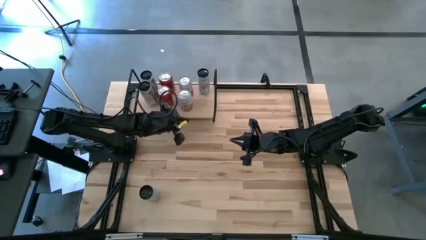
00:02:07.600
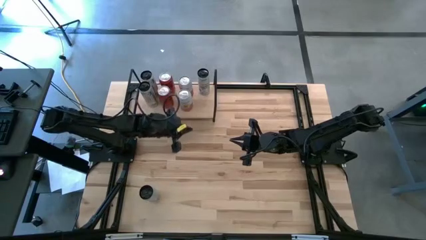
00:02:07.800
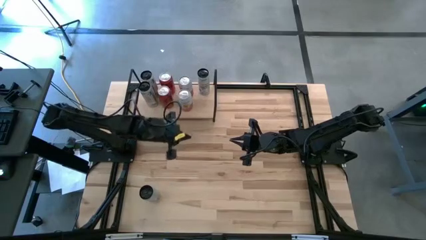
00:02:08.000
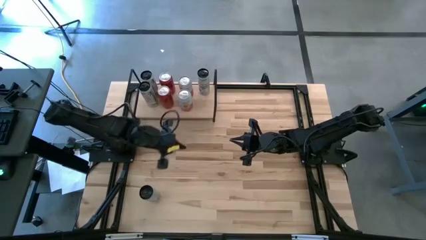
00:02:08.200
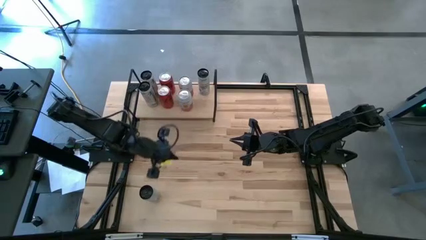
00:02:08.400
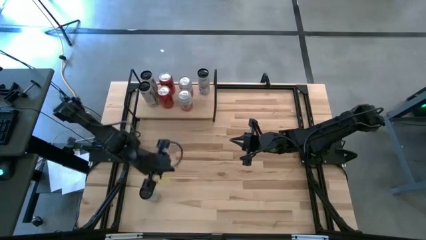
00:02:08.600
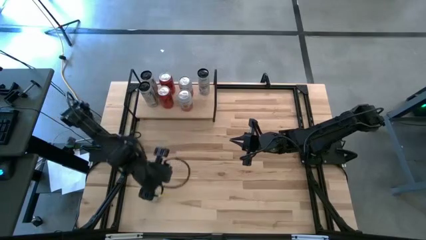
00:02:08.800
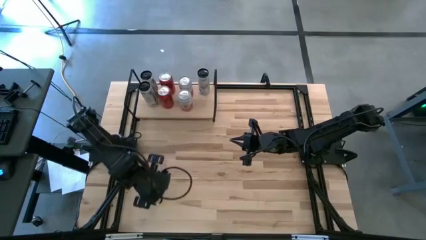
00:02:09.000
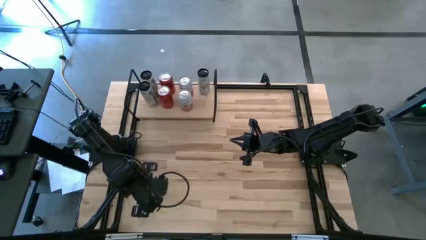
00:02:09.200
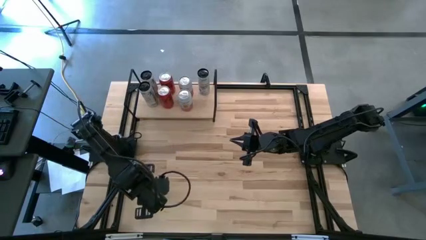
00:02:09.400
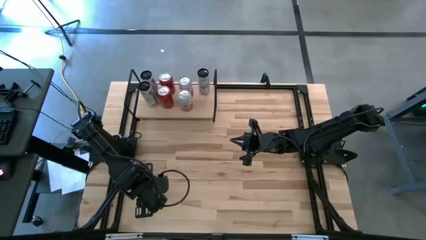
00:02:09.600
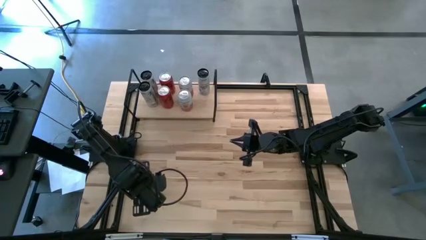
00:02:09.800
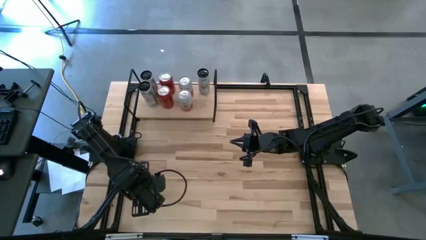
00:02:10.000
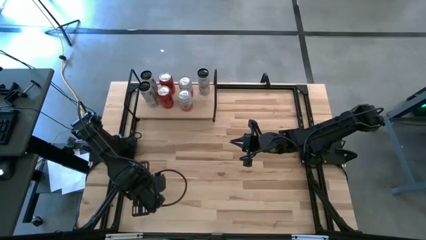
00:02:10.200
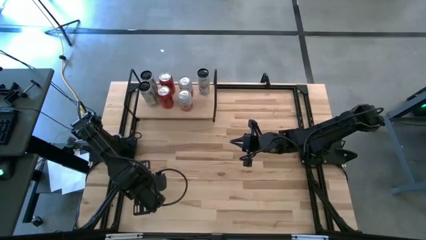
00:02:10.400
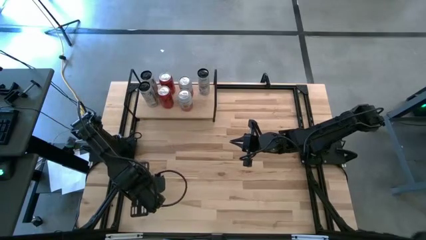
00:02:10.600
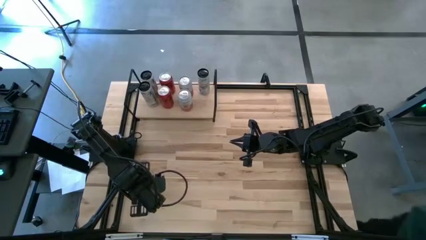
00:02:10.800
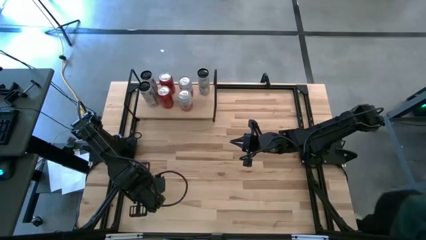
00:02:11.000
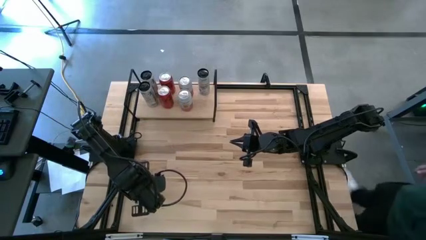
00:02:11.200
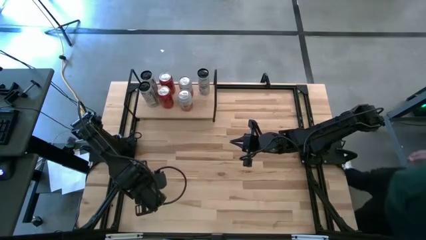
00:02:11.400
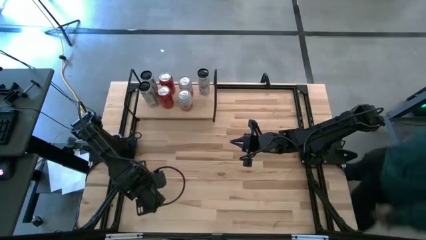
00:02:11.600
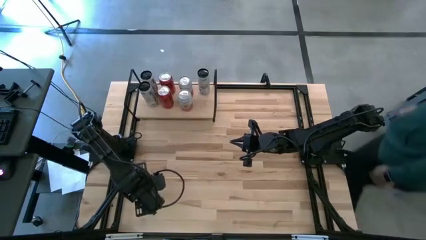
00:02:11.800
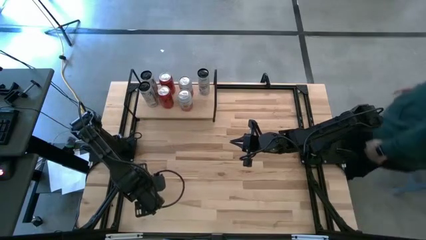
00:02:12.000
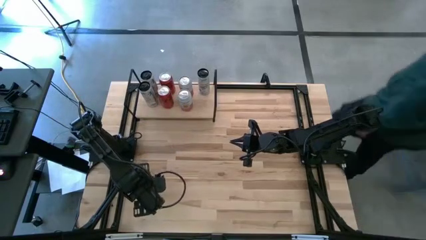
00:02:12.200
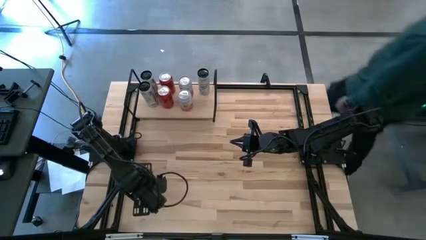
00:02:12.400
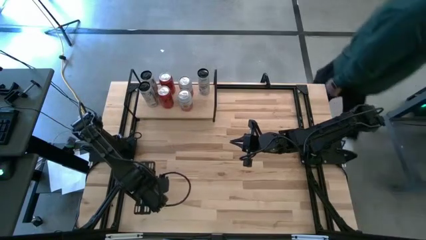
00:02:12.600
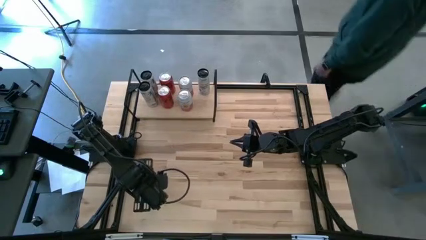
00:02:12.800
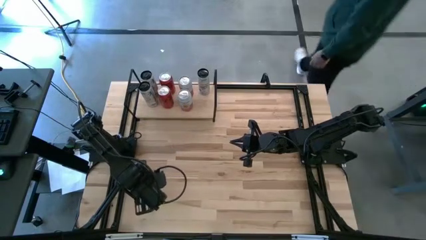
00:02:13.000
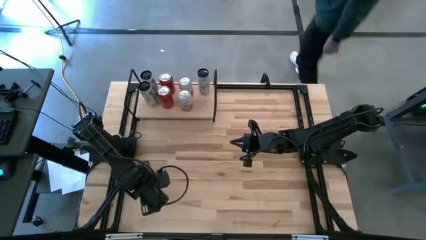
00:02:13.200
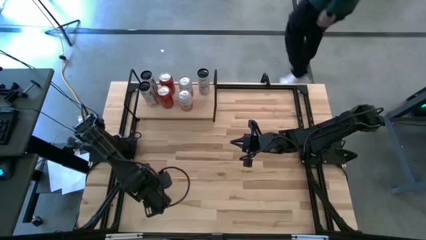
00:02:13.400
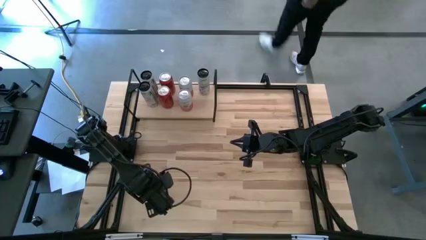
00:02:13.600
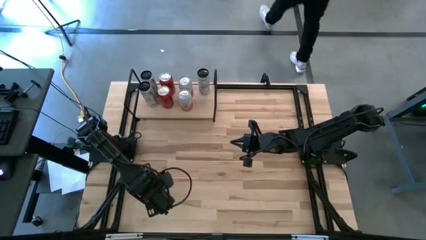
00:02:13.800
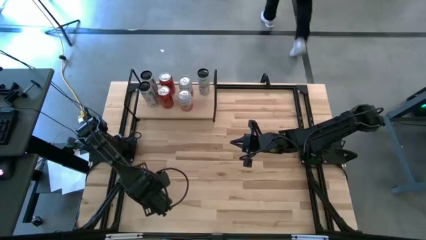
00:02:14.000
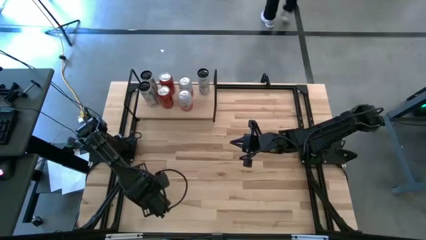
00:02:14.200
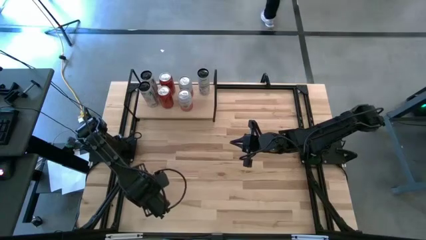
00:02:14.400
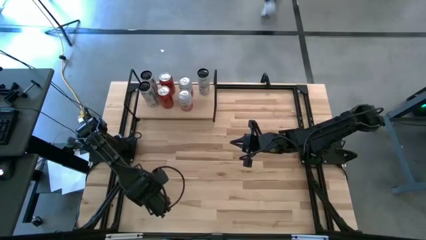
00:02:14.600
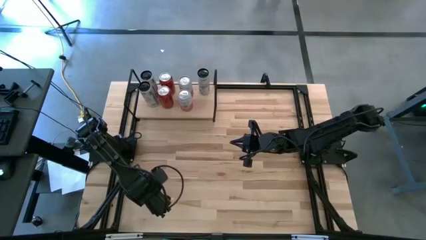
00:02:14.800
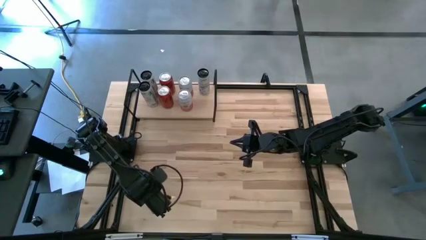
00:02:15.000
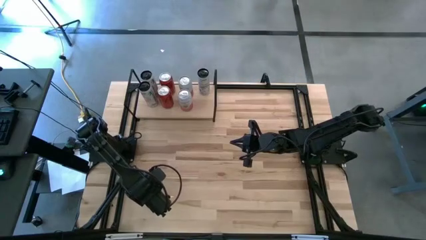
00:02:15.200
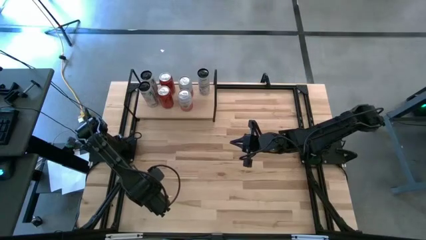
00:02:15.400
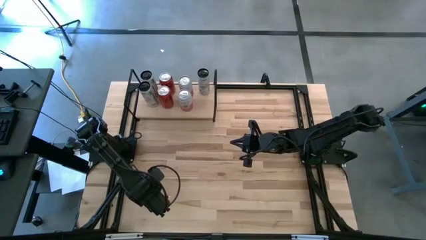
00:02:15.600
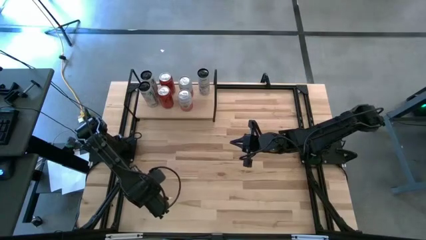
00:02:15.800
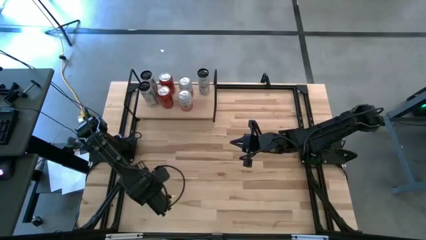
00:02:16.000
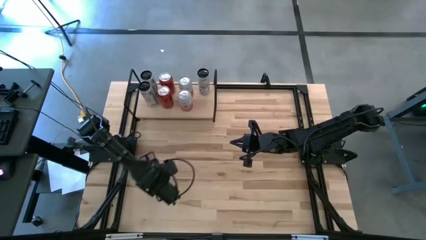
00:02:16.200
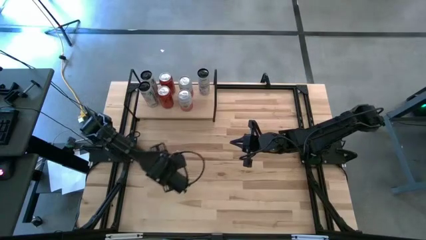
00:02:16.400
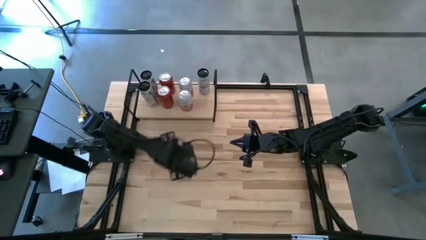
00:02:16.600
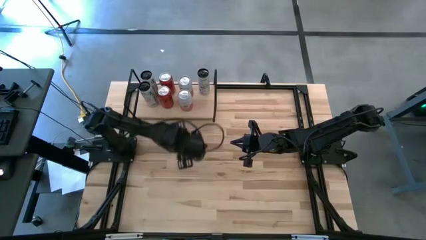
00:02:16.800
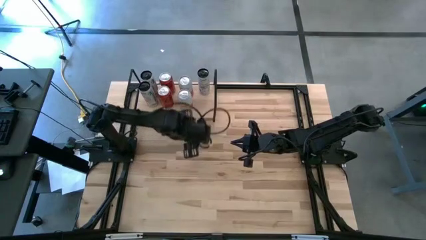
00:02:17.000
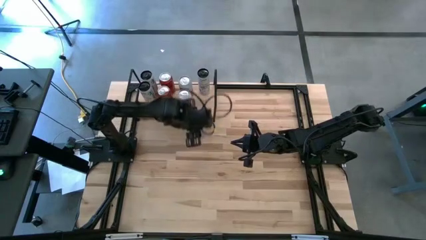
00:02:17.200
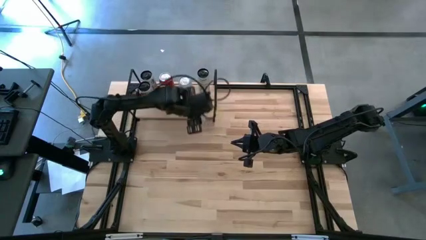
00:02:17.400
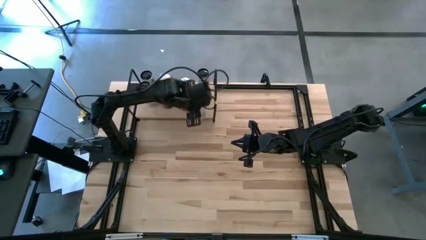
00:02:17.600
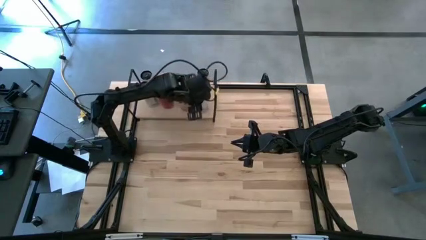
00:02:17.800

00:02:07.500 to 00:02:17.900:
Task: Place canned beverage on shelf
Put the white-blue soda can on the shelf aligned with the other white-blue soda can

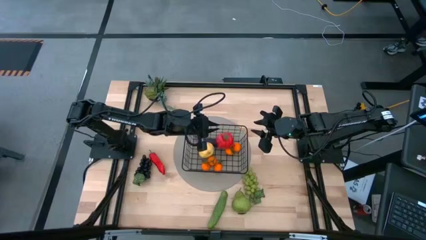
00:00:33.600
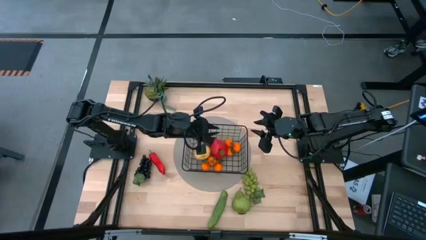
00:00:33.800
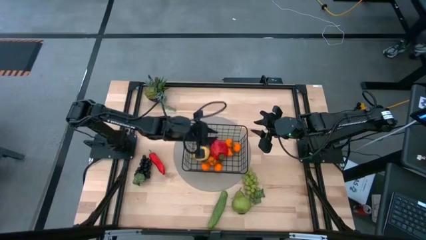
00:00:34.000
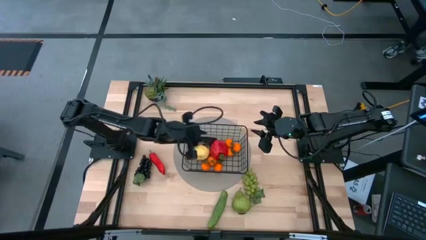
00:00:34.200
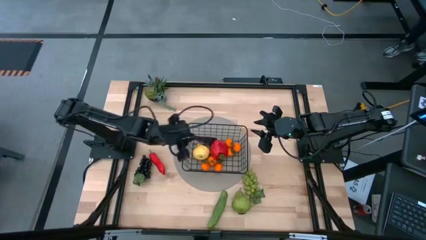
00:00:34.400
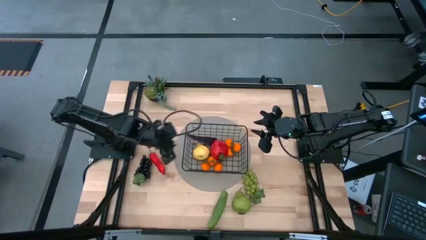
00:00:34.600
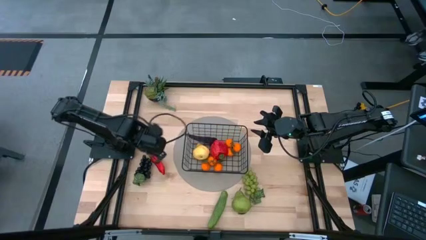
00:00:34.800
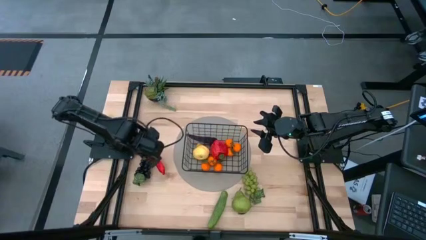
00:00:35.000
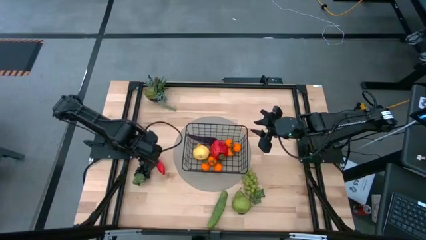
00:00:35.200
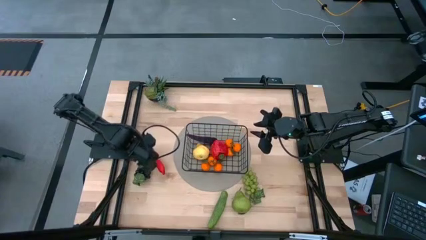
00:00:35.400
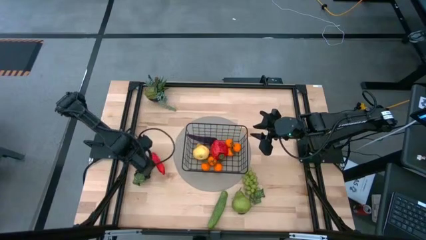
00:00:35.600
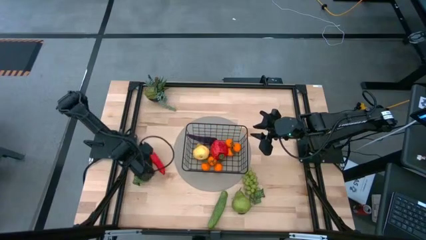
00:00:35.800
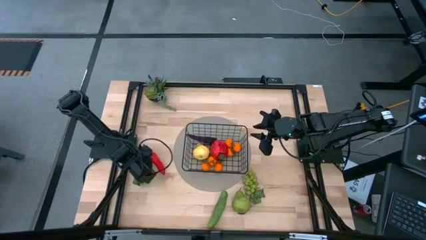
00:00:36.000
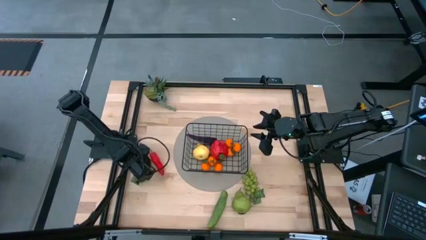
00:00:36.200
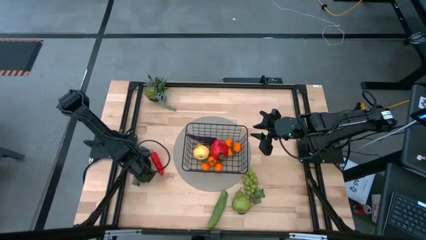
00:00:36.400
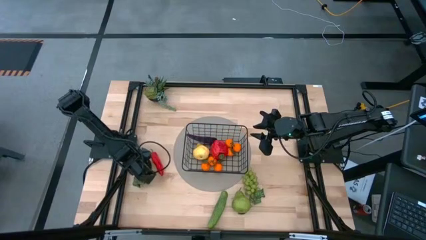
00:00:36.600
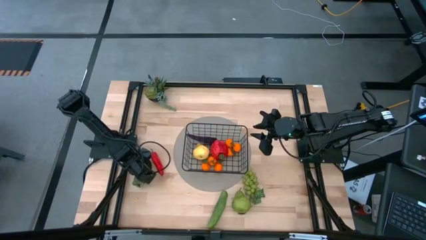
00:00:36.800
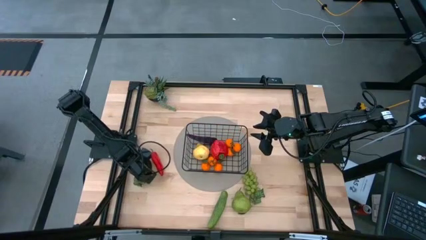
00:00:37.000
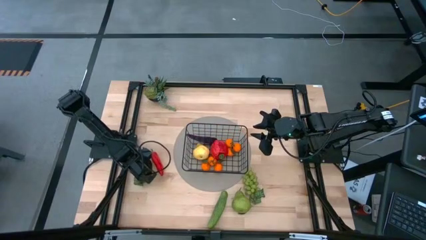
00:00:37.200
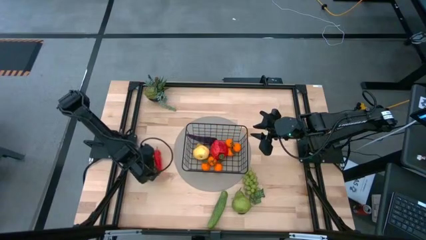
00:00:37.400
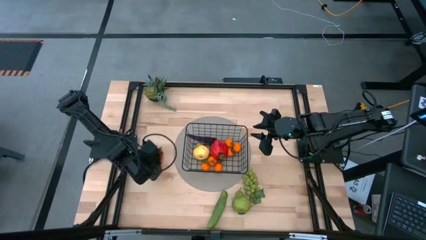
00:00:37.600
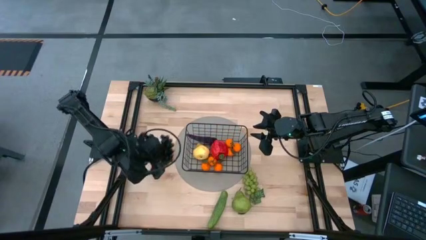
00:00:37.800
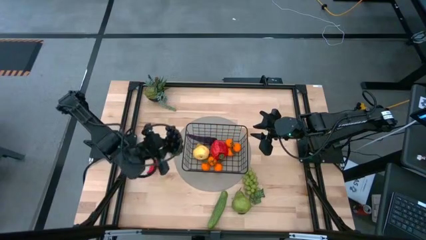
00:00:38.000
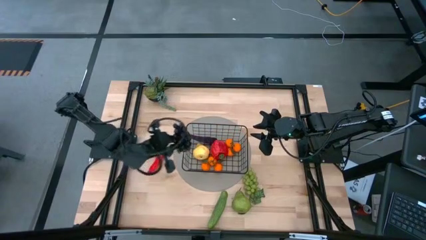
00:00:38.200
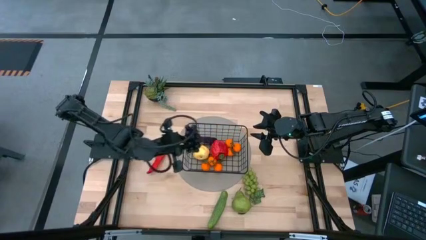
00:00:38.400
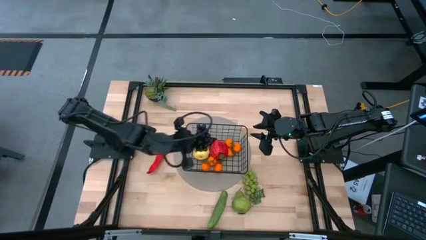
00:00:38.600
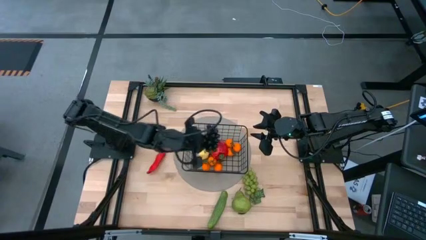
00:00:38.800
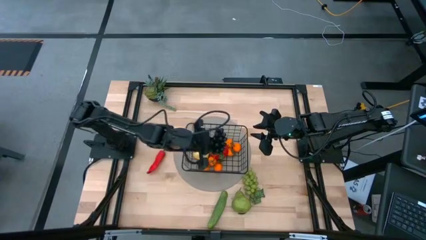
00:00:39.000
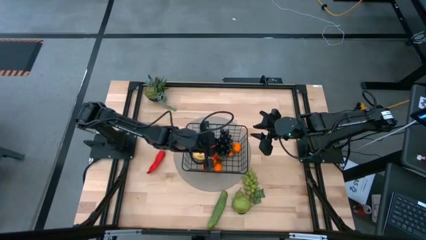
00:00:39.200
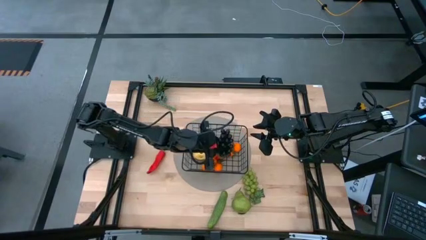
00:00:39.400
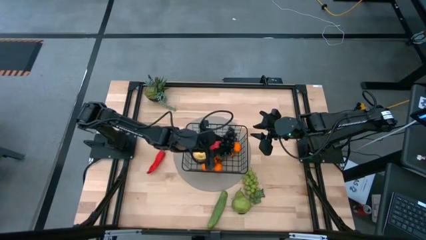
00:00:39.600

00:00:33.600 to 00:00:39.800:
Task: Build produce basket
Put the purple grapes into the black wire basket
